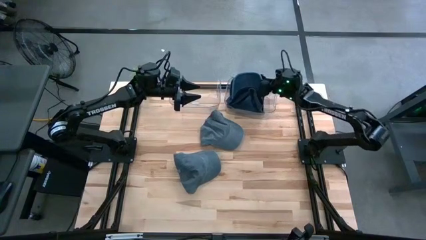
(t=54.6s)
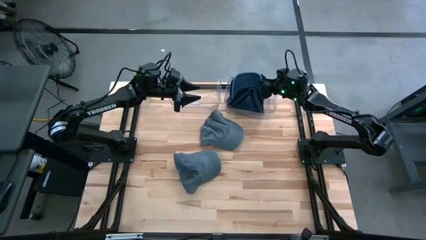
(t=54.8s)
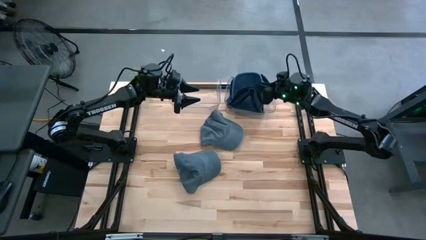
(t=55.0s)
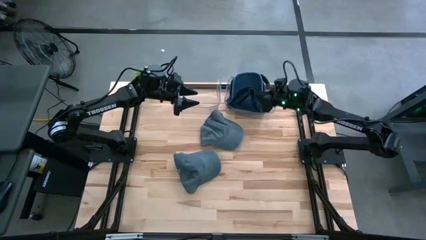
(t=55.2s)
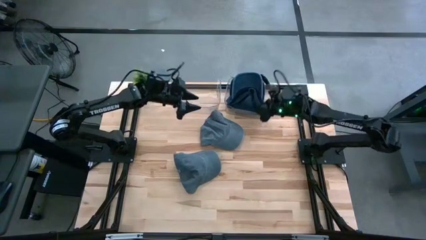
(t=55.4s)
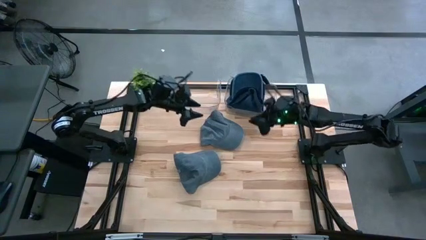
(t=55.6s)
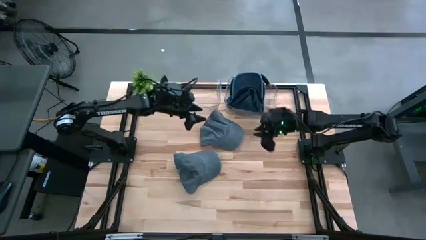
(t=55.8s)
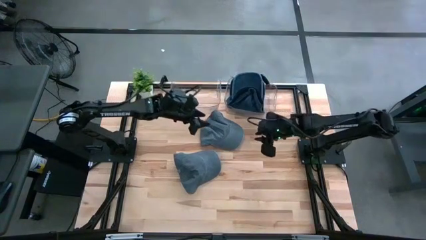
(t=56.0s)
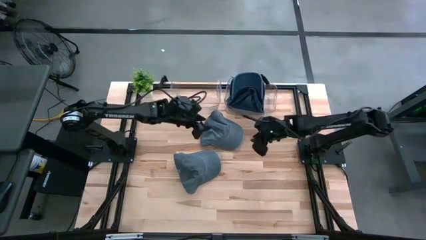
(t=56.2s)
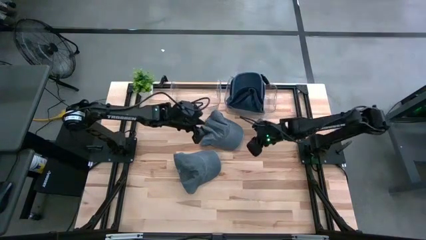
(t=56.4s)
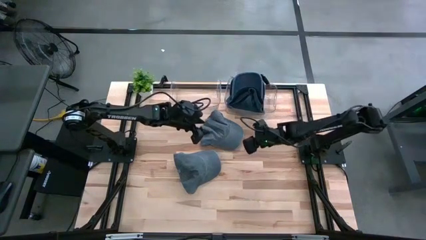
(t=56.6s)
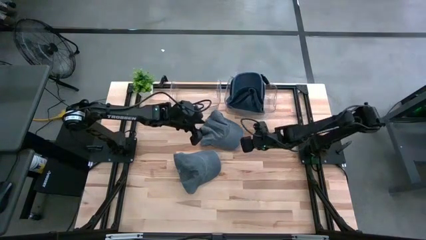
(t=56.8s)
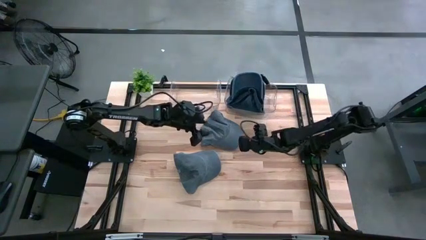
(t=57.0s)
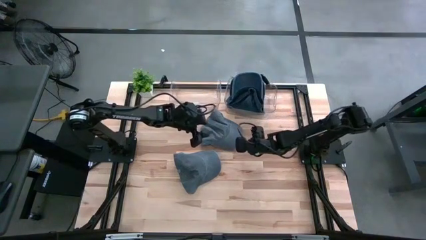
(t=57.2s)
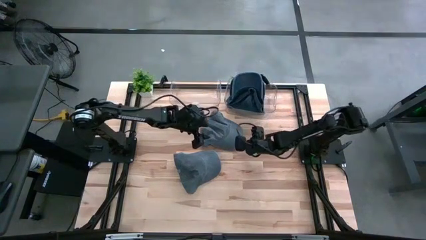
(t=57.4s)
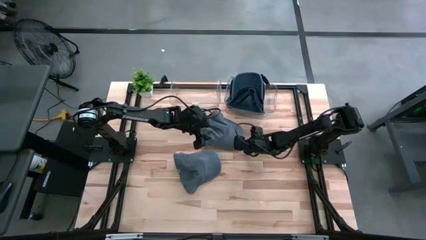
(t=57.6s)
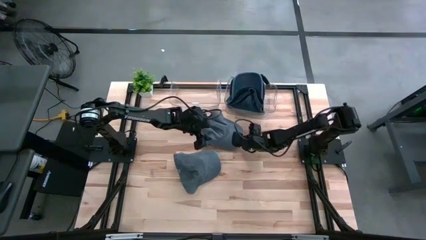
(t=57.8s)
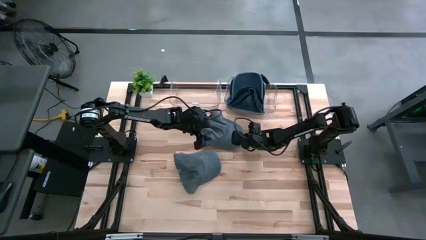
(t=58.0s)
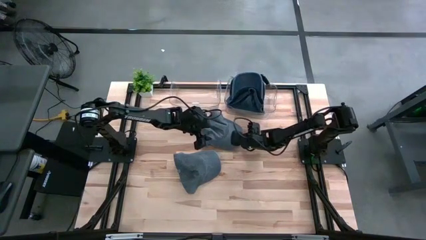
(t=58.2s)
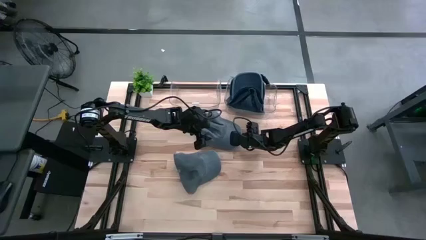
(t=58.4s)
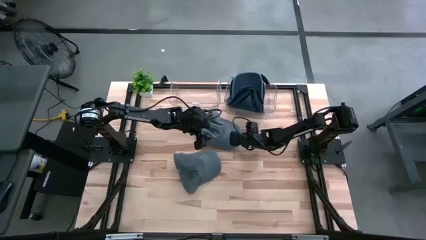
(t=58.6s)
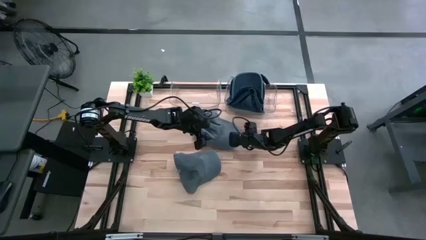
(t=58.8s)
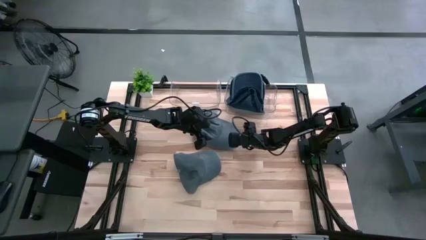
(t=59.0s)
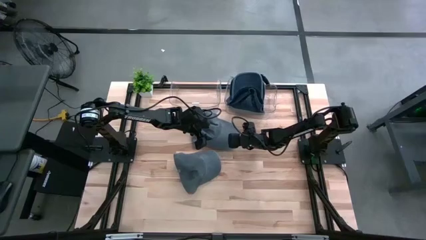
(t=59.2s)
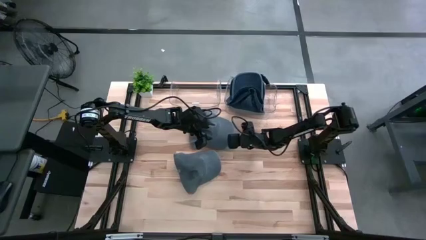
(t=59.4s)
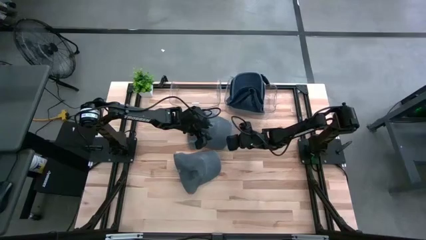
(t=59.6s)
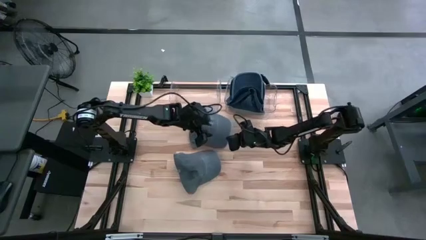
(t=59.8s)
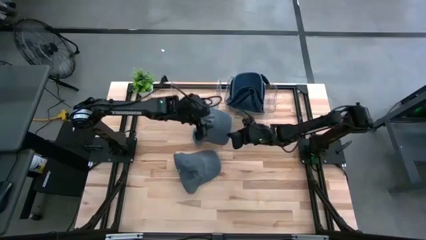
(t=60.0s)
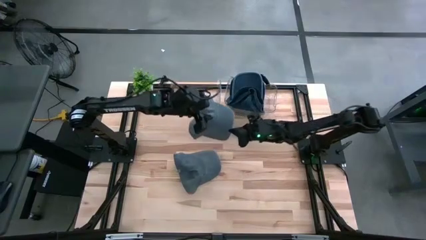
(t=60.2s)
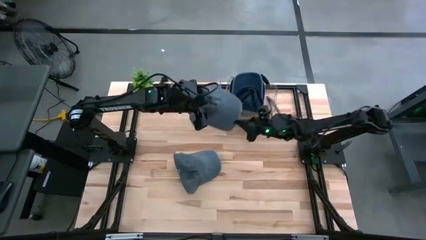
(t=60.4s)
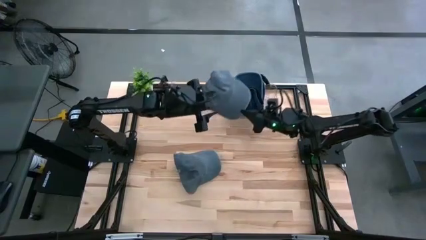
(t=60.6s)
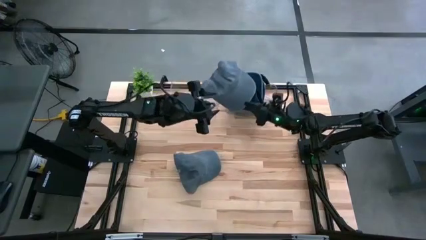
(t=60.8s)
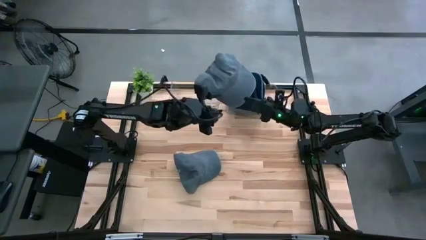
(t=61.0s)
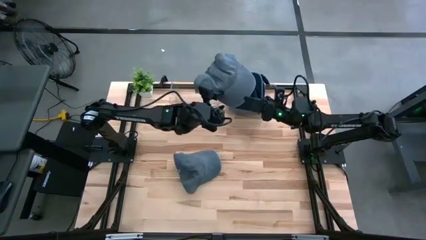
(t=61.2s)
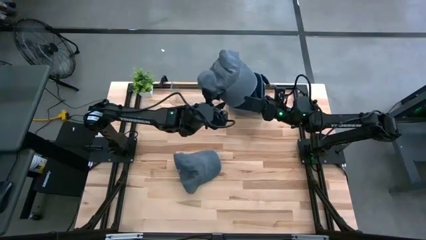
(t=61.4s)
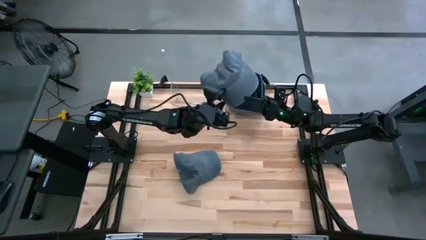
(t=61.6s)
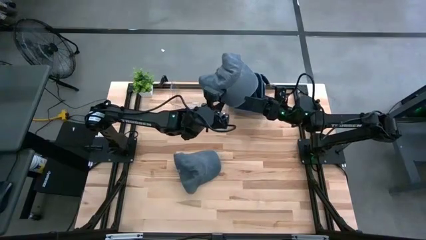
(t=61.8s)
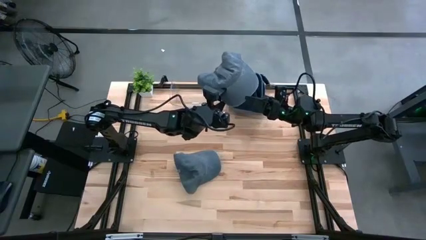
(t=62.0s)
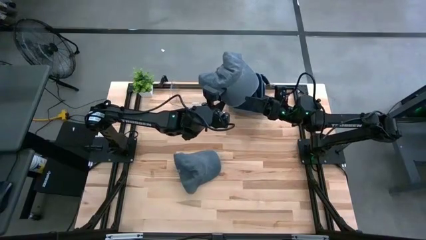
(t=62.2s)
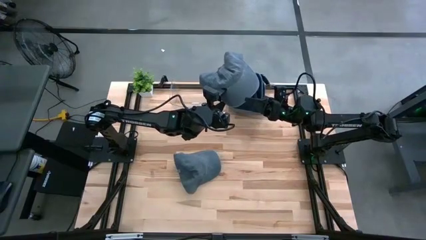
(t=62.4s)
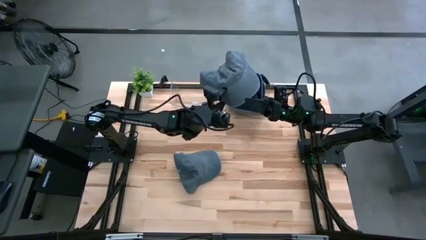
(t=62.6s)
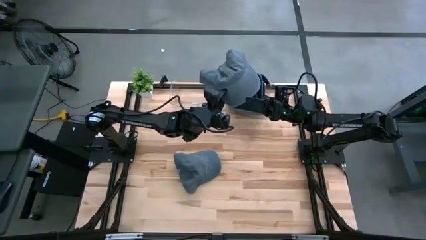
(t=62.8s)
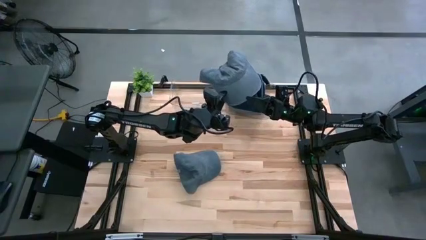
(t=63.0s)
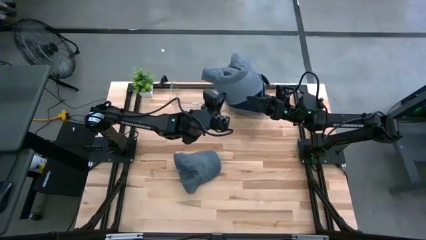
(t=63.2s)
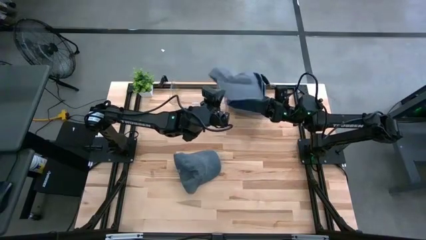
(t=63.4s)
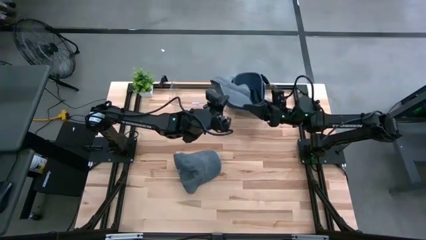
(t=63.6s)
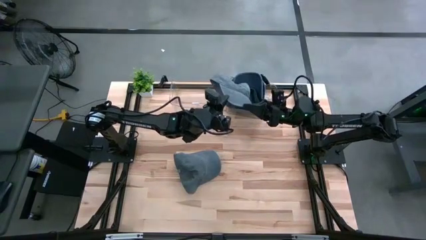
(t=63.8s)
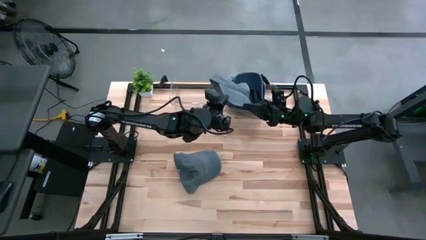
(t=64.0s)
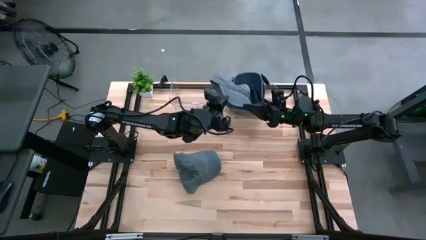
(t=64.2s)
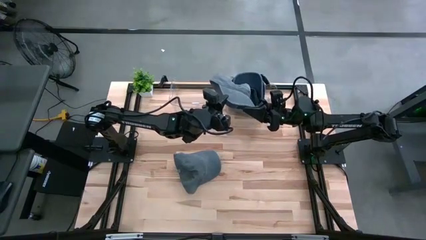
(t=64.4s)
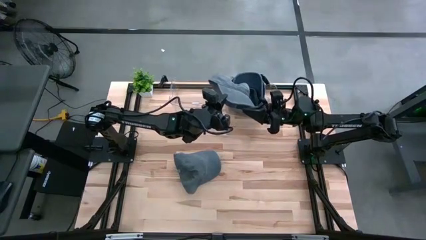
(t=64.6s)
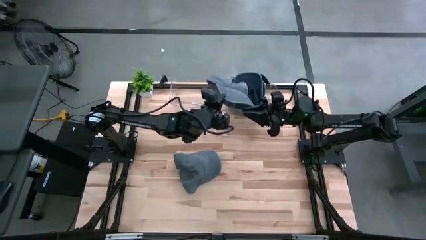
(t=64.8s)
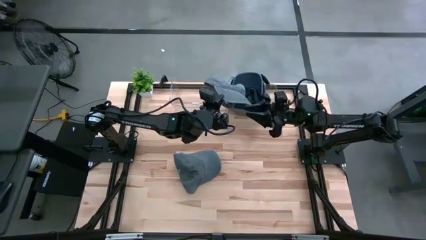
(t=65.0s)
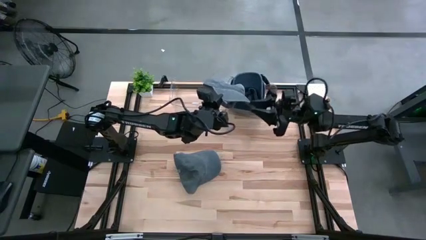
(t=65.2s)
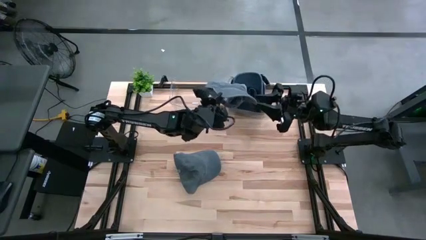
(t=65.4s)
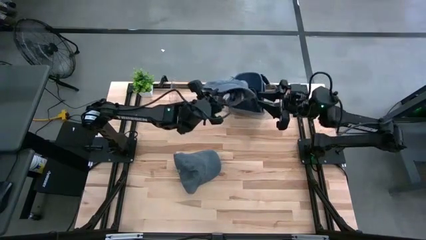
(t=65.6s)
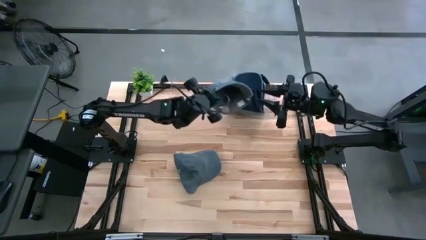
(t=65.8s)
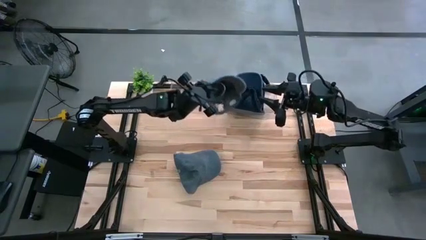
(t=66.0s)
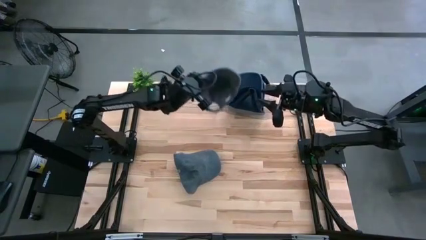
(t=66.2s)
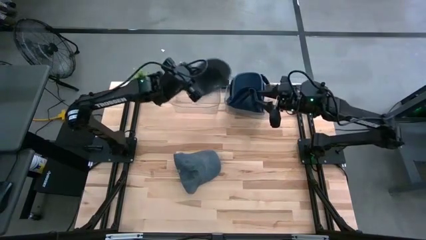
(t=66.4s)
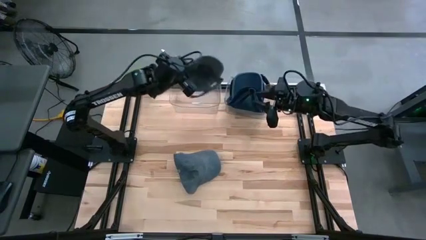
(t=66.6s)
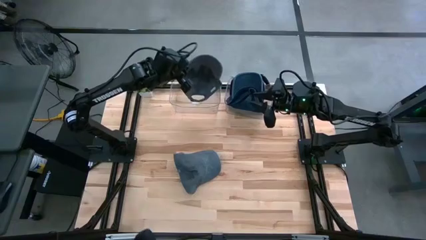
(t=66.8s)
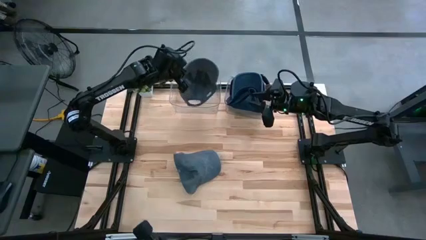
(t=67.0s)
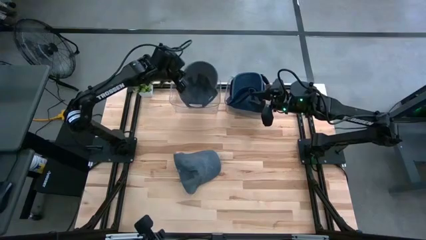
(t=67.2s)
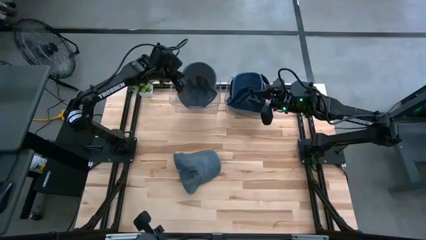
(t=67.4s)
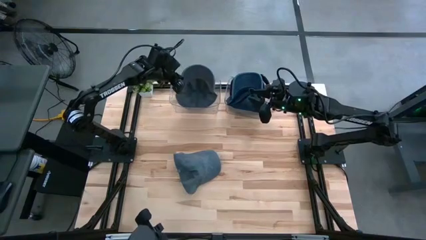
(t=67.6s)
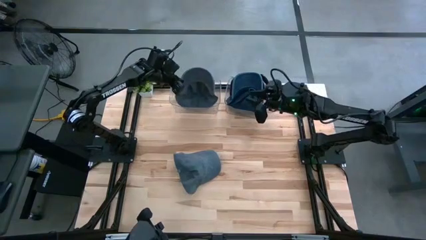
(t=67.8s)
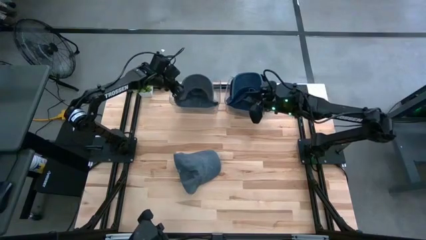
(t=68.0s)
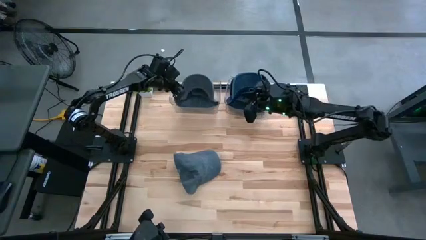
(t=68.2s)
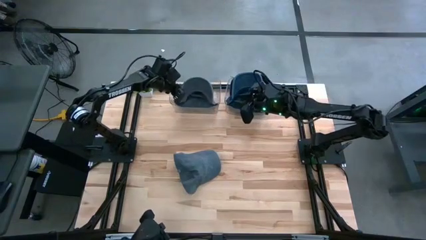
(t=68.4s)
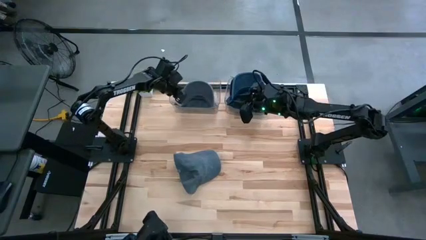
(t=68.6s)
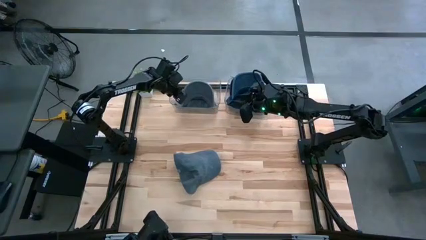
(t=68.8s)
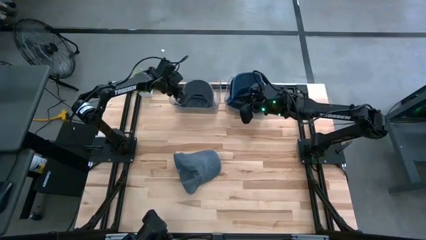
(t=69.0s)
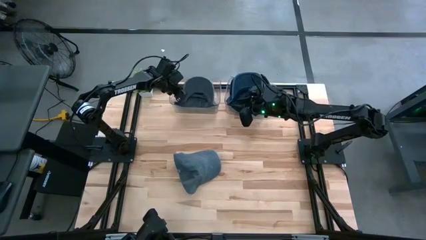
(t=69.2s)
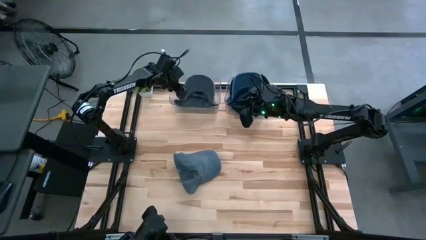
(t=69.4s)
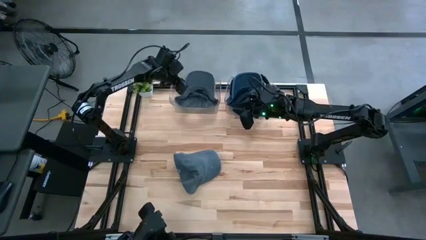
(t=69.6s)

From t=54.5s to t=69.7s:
Task: Pick & Place hat
Put the top gray cap into the left transparent bin
